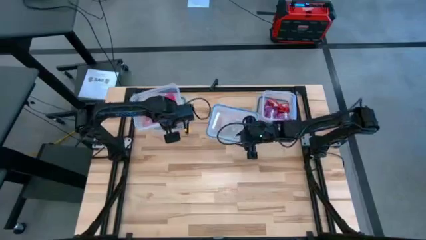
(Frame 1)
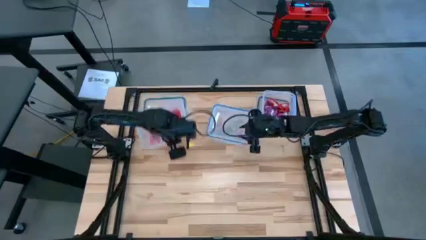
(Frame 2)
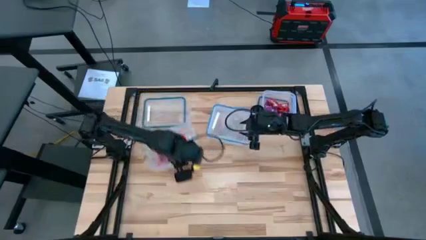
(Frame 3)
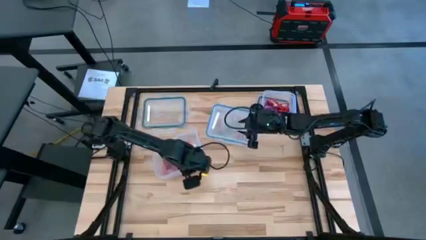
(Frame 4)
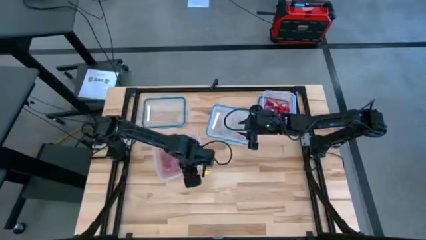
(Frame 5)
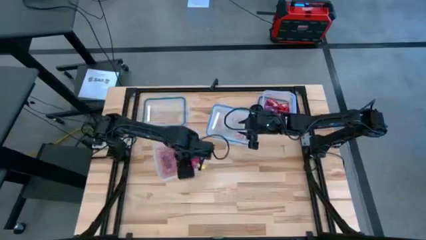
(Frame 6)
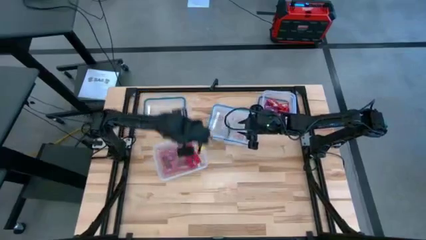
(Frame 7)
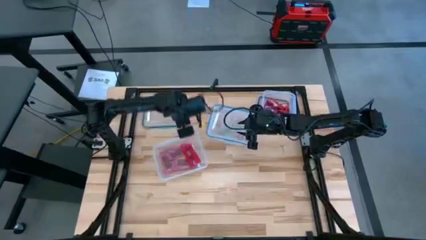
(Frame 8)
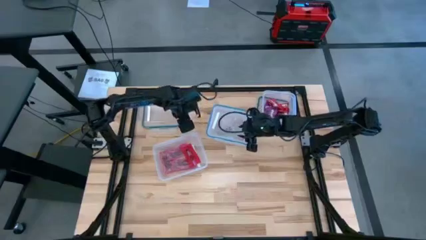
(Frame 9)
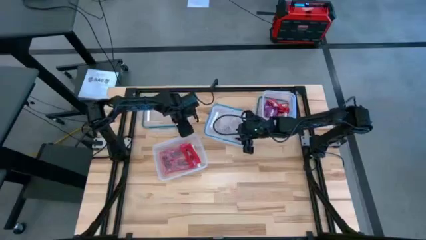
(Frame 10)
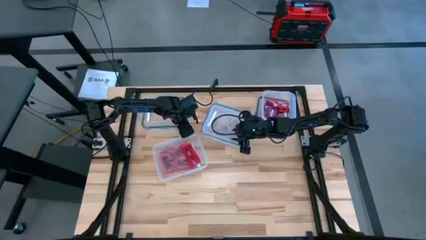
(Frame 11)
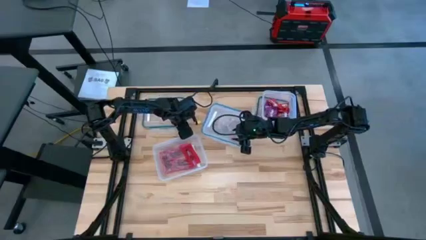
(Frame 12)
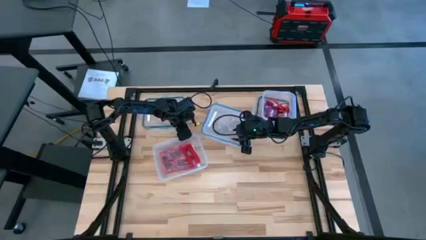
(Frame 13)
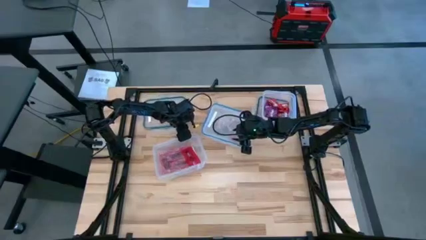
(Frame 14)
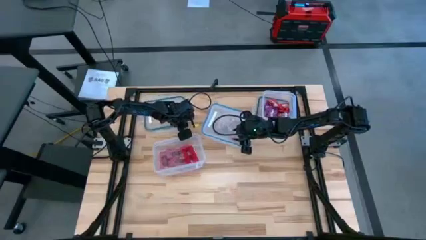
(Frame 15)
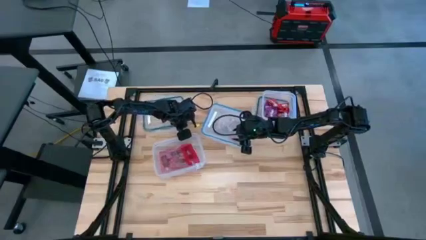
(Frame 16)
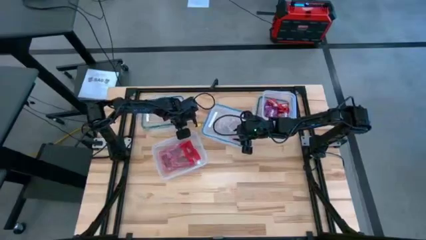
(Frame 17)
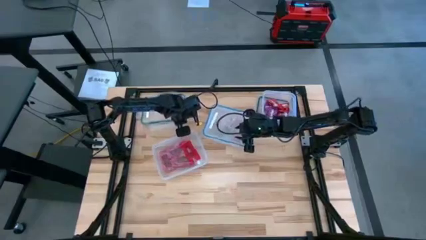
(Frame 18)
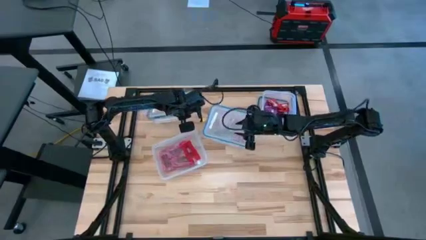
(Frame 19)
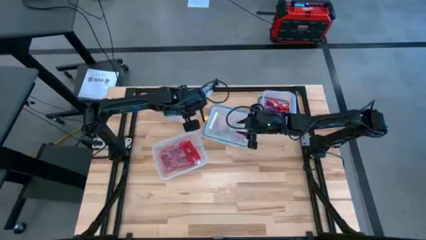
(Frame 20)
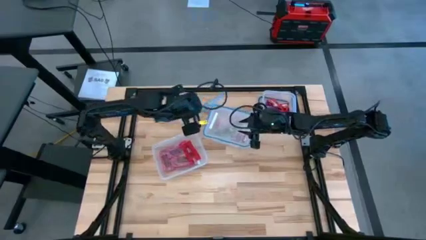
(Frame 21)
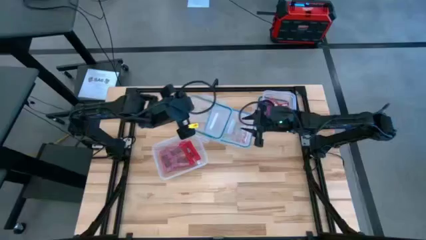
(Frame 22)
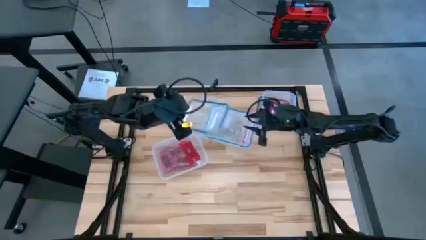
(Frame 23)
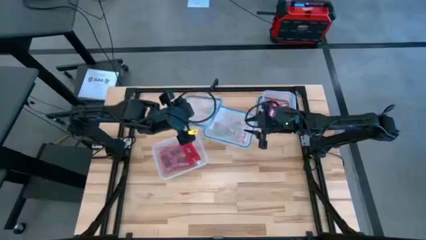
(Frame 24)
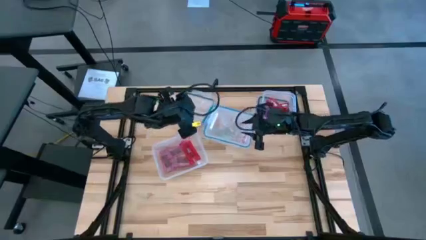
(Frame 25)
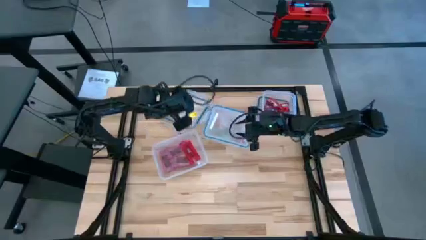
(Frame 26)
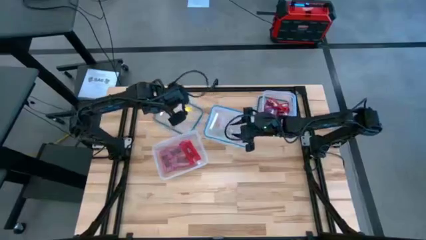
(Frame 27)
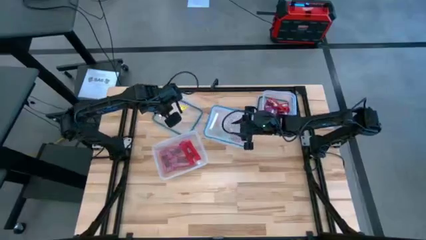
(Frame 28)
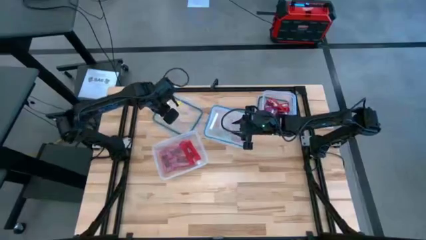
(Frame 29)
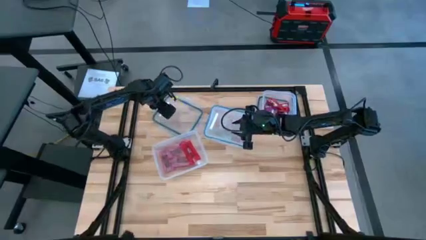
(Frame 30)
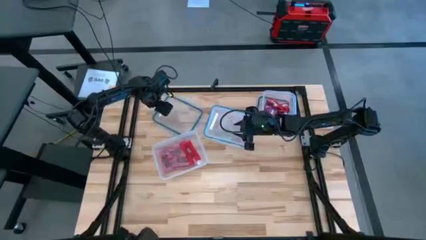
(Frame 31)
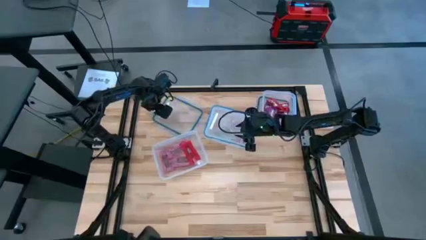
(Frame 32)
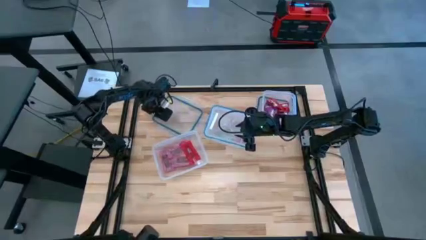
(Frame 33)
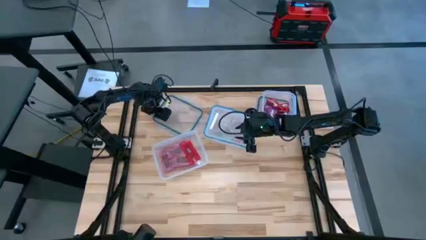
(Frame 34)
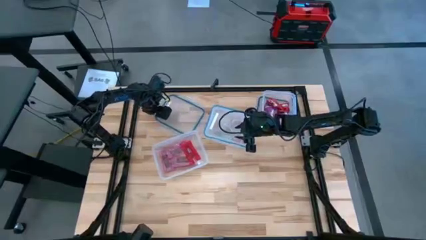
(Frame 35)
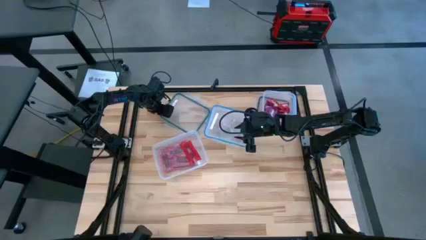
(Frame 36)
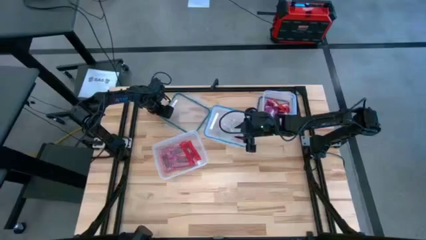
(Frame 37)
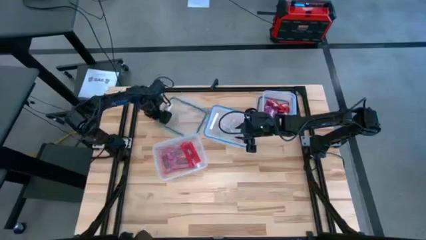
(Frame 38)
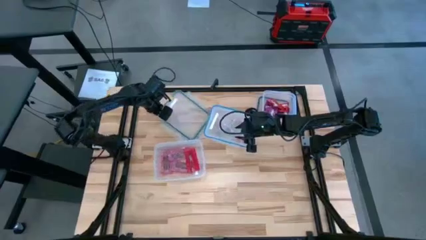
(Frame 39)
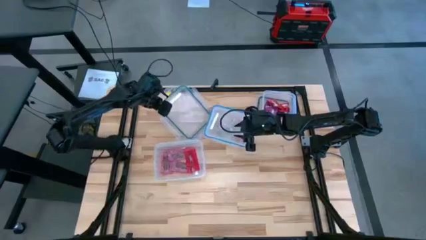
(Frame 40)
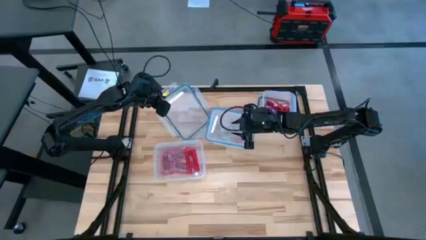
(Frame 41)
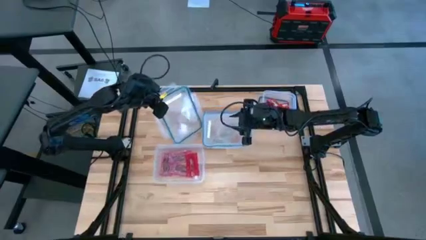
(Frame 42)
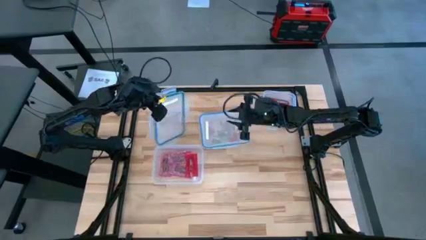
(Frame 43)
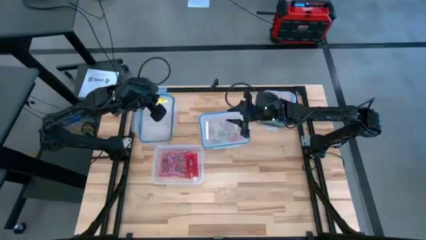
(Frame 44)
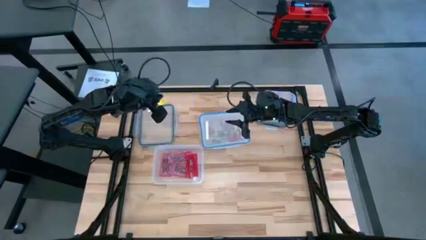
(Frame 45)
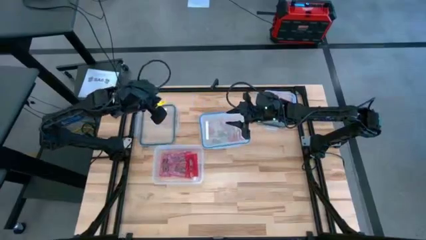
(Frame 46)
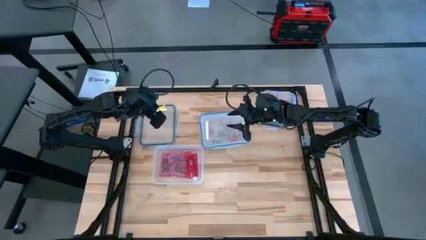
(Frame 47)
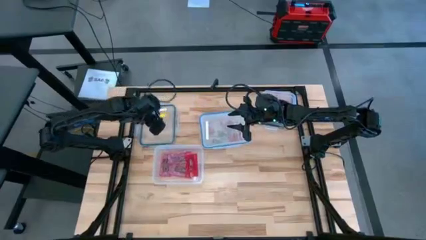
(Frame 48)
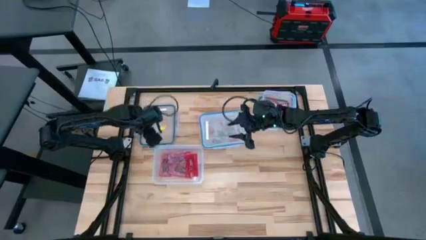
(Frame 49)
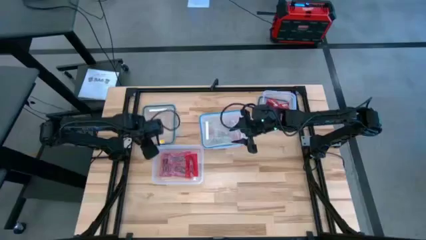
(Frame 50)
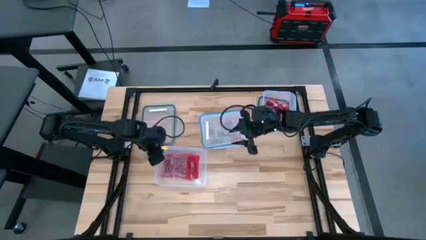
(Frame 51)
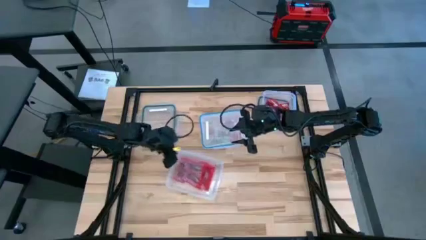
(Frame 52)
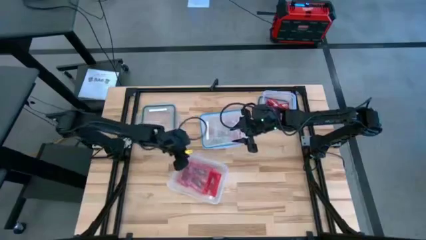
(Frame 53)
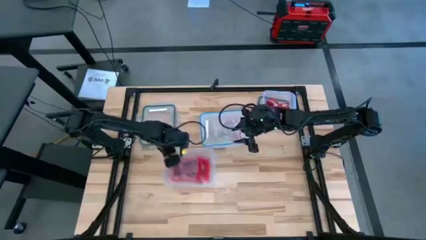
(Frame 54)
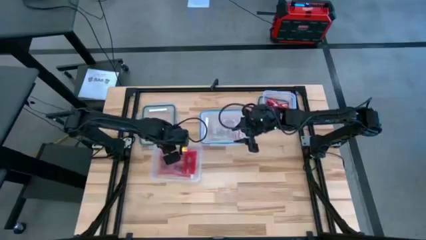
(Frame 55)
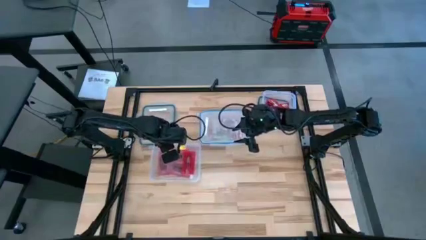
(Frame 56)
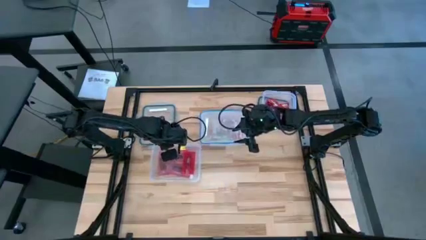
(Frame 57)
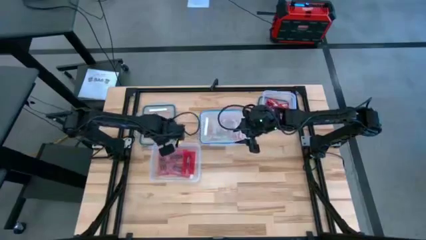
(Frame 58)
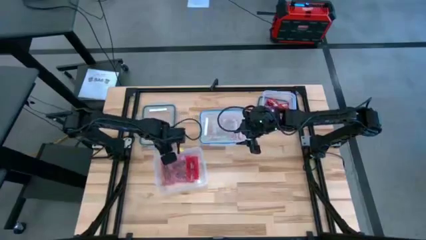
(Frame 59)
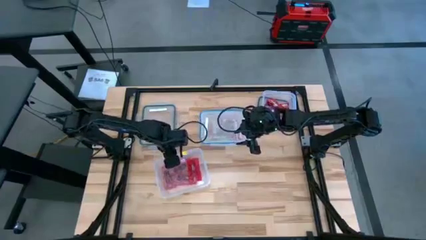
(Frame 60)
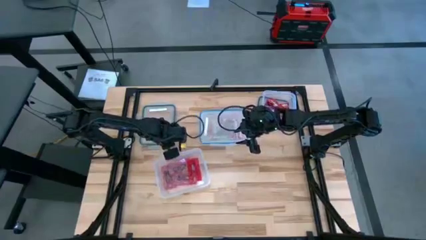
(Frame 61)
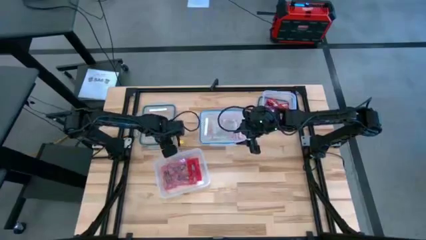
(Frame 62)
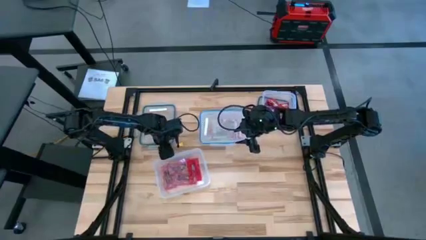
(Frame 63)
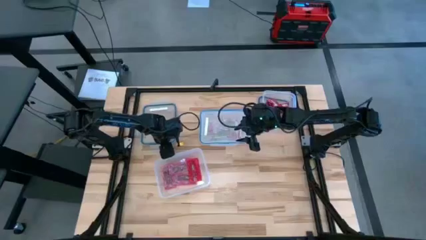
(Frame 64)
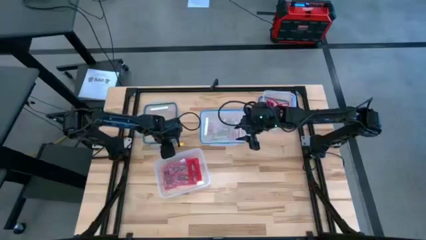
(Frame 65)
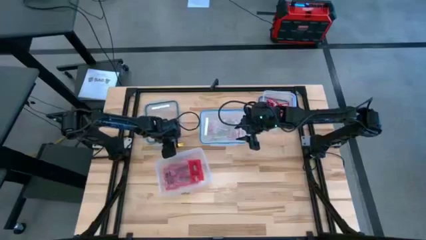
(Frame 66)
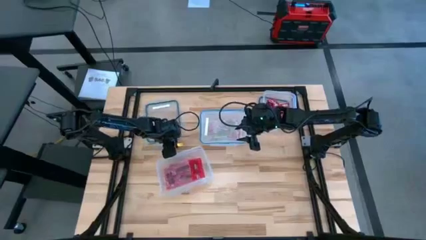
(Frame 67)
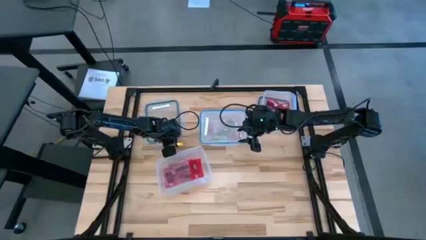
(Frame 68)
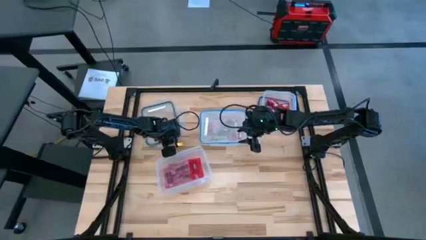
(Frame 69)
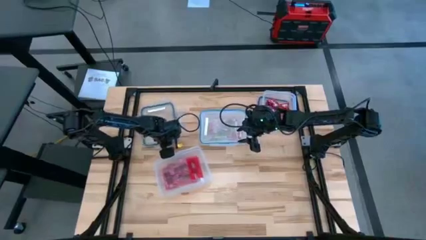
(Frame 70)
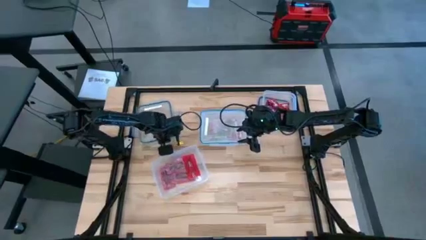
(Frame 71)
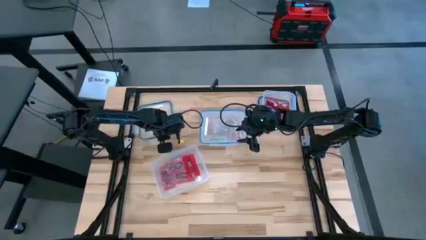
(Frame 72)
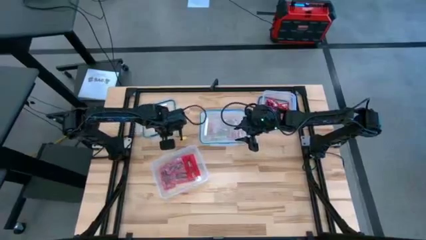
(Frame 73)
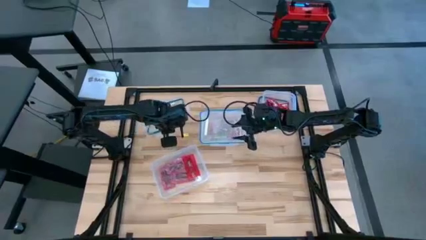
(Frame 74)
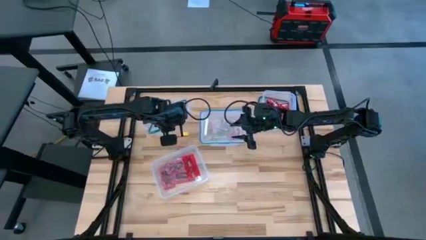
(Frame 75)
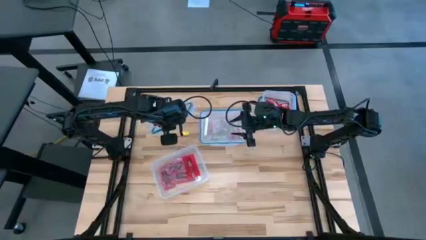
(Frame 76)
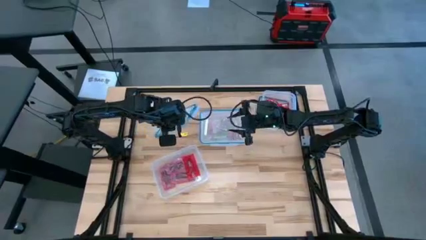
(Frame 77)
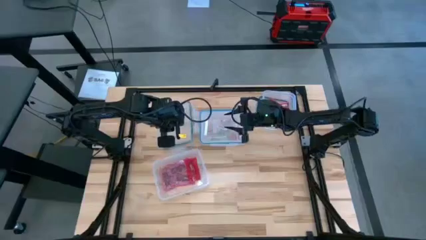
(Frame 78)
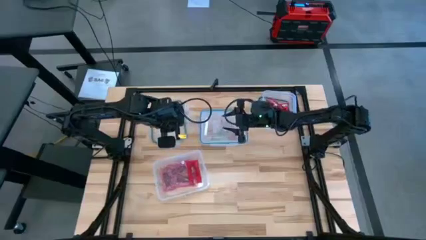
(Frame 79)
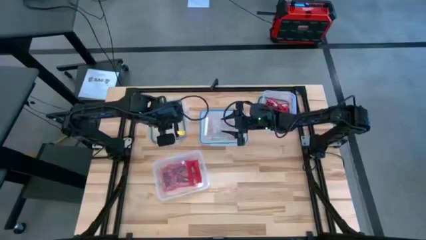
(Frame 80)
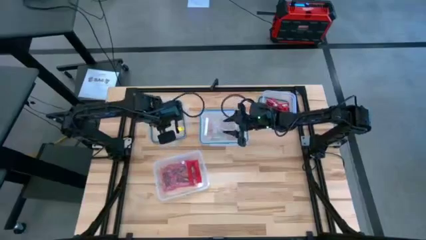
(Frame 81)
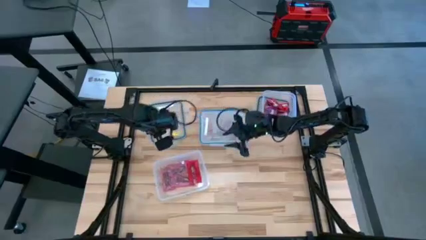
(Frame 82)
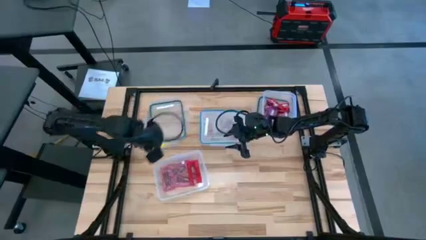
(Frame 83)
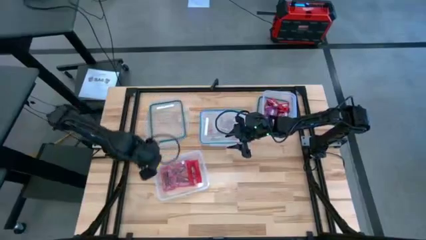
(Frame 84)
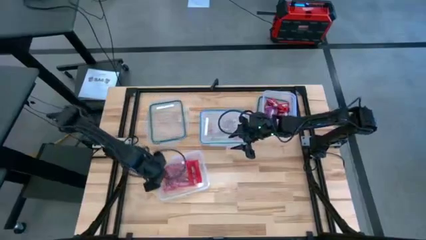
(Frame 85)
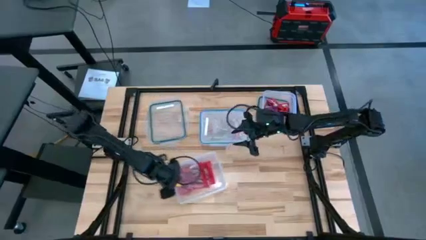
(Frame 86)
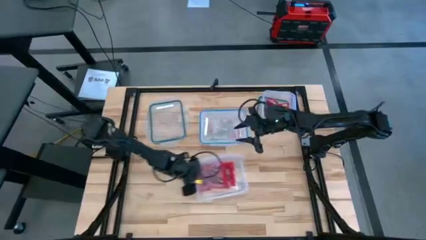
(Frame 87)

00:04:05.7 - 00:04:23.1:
Task: Sort candy
Close the top left transparent bin
